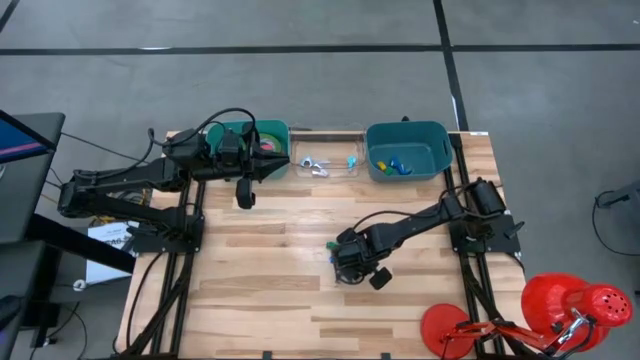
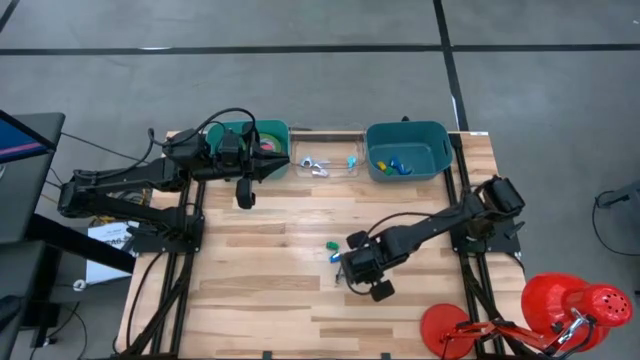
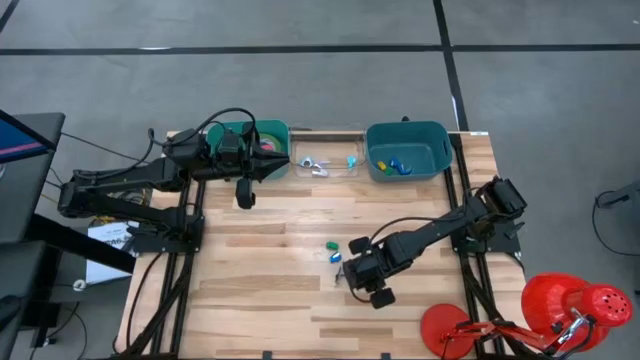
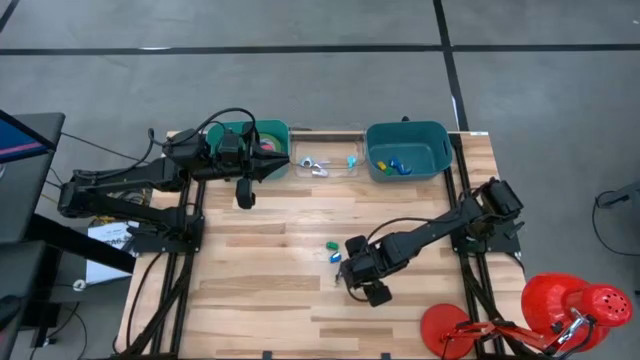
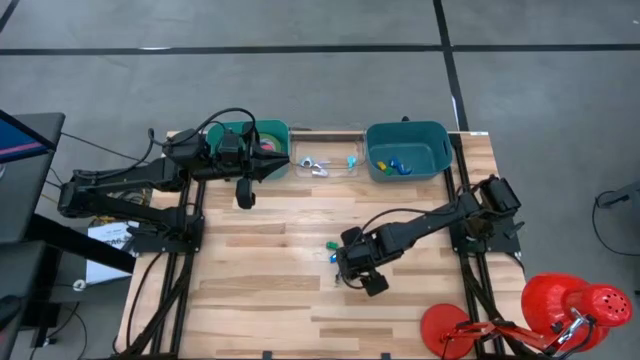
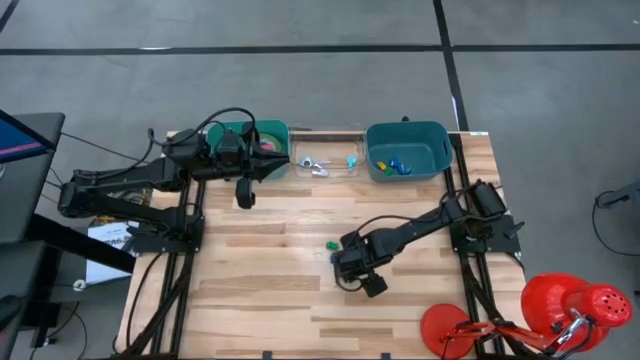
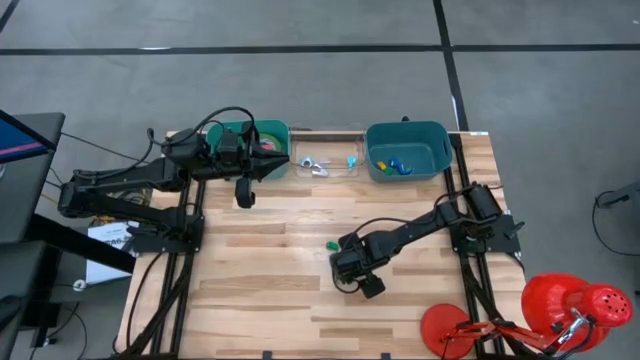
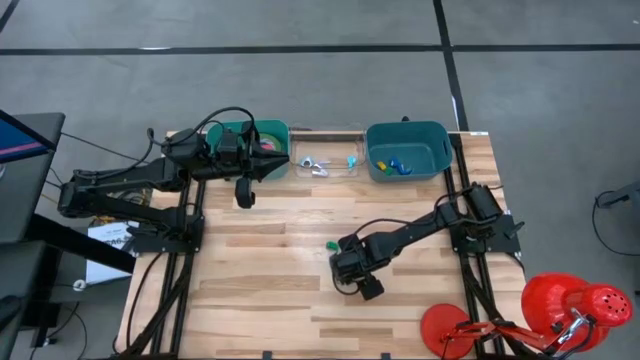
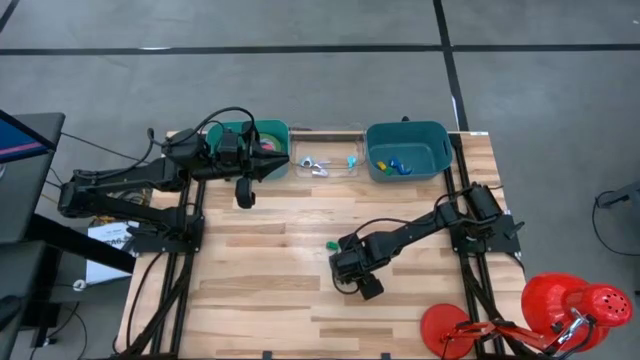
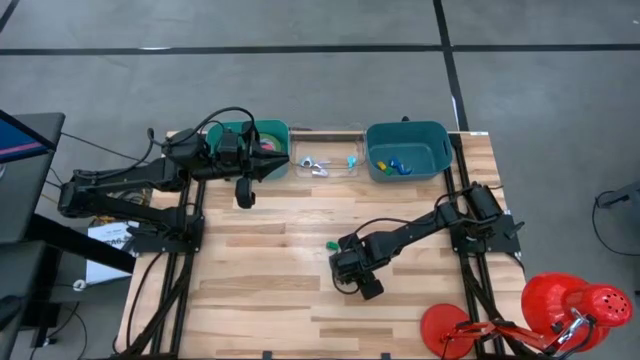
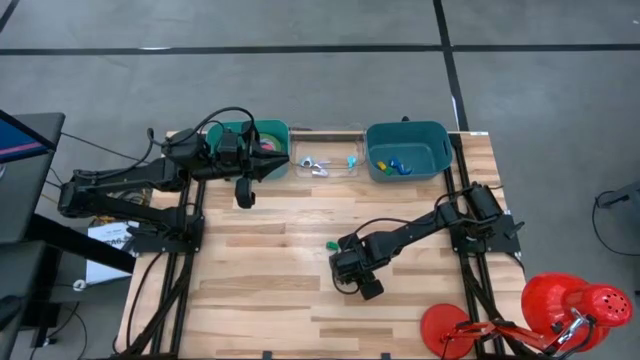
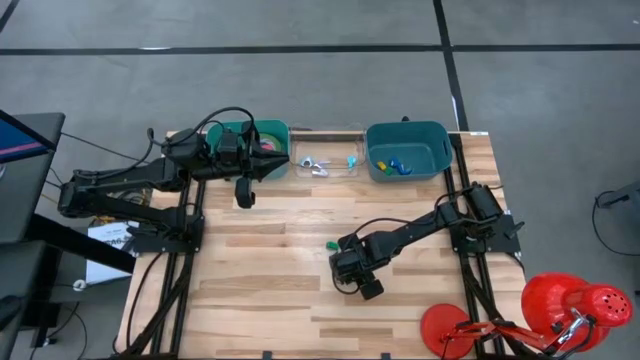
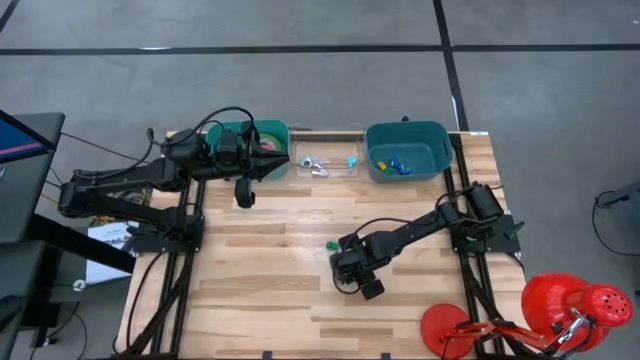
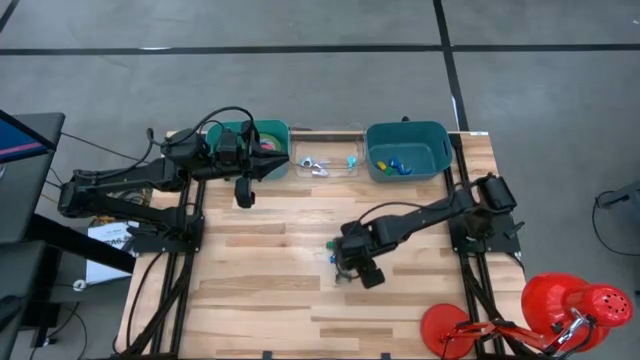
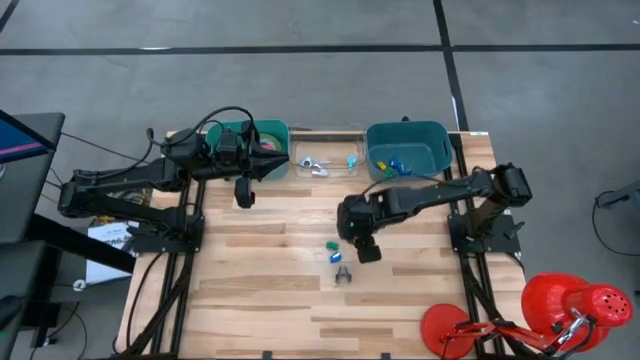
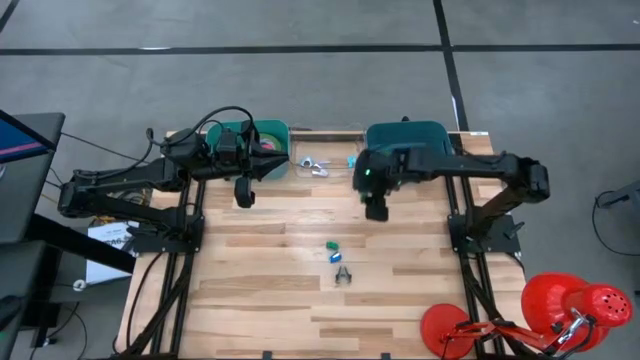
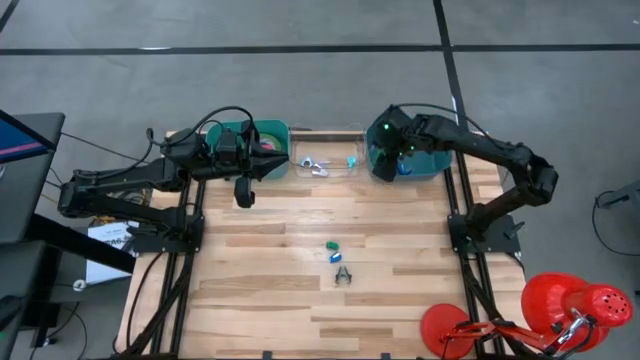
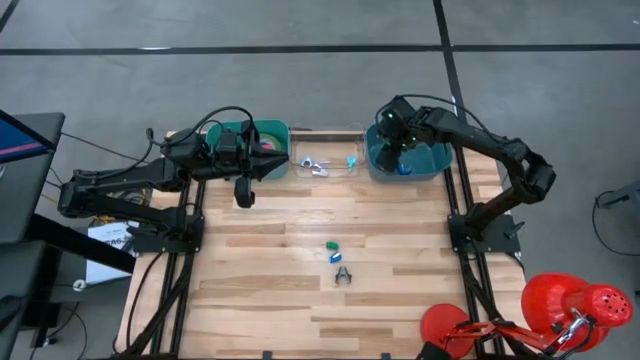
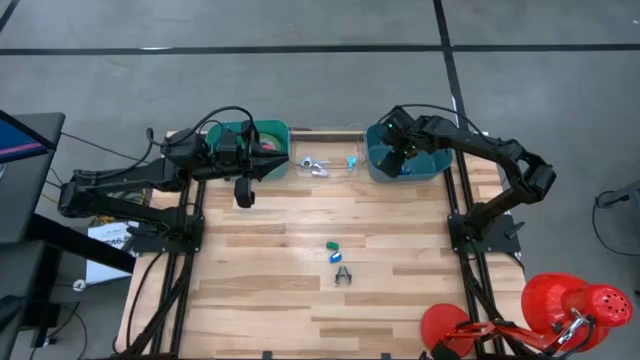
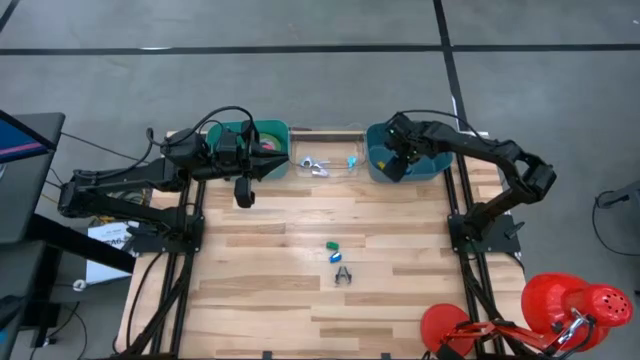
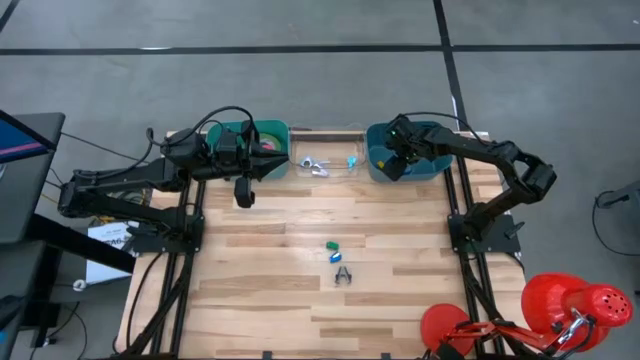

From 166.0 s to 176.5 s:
Task: Pick and place Stapler, Stapler remover, tape
Put the green stapler into the dark blue bin

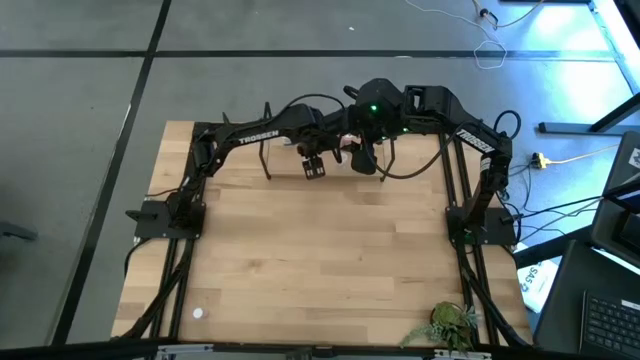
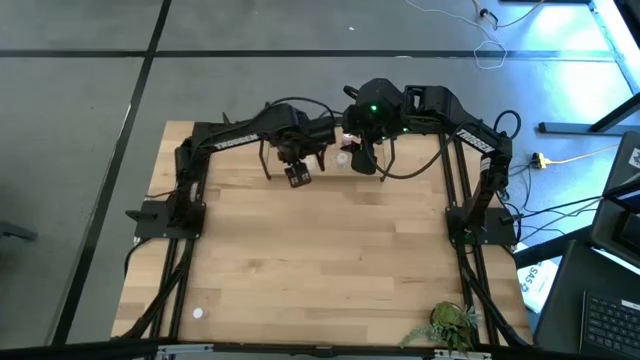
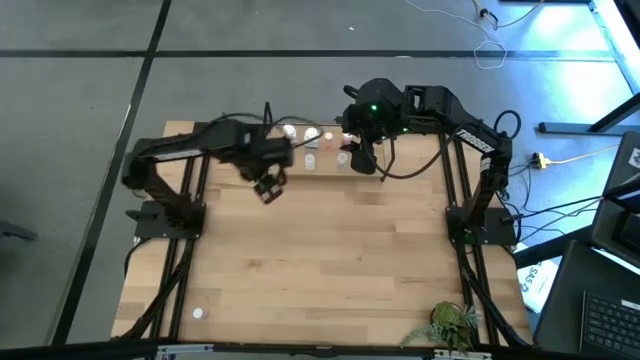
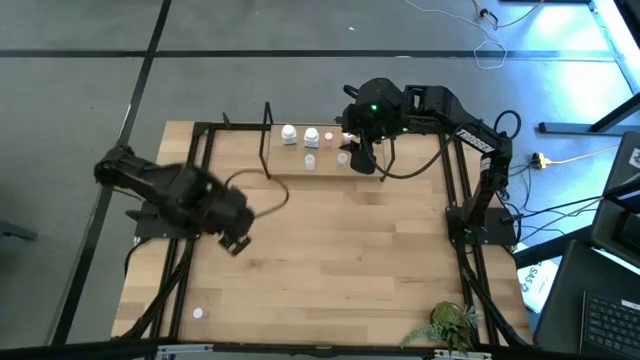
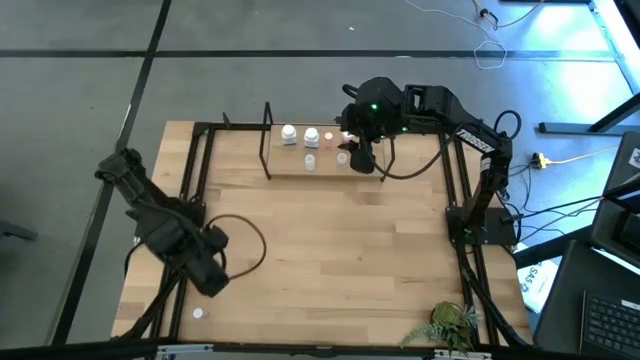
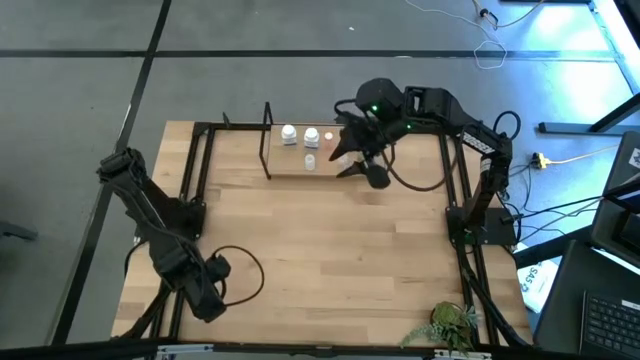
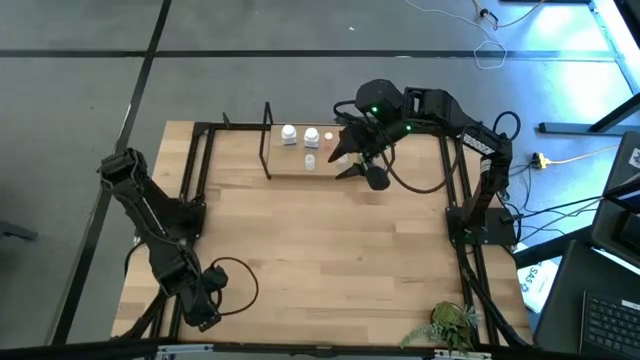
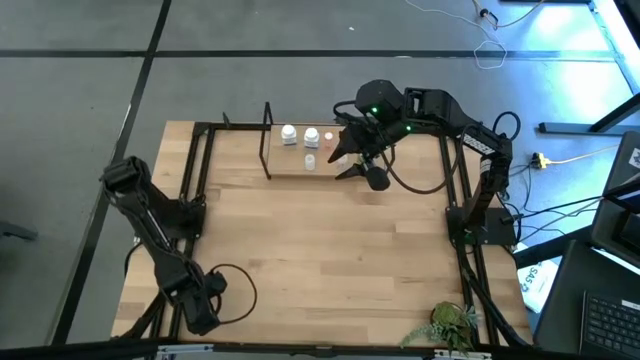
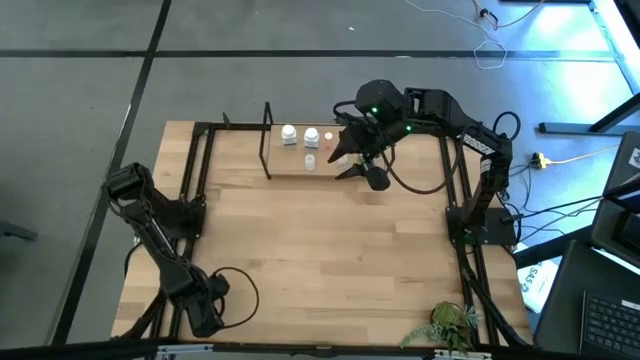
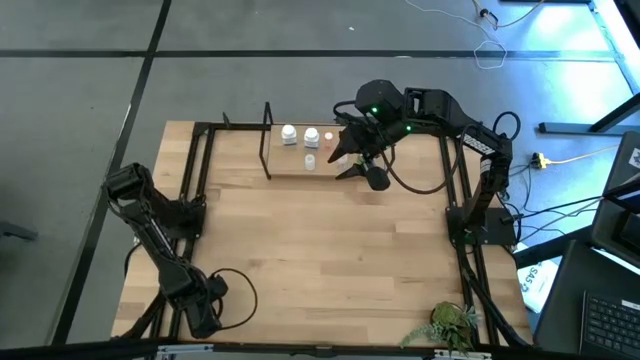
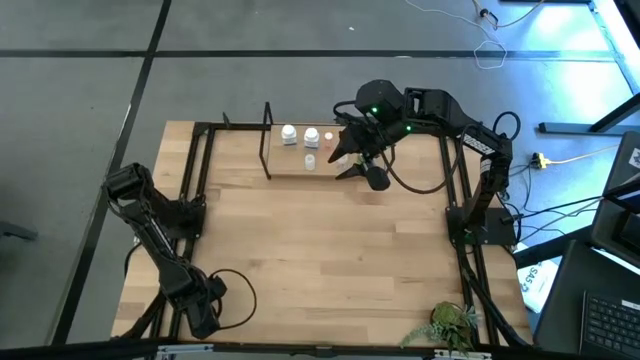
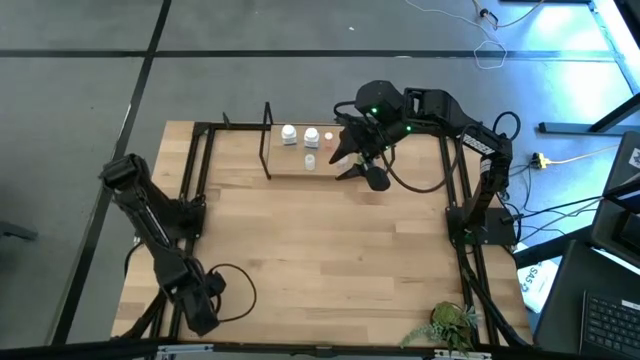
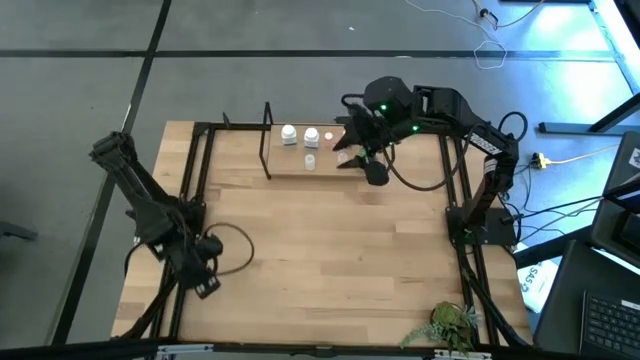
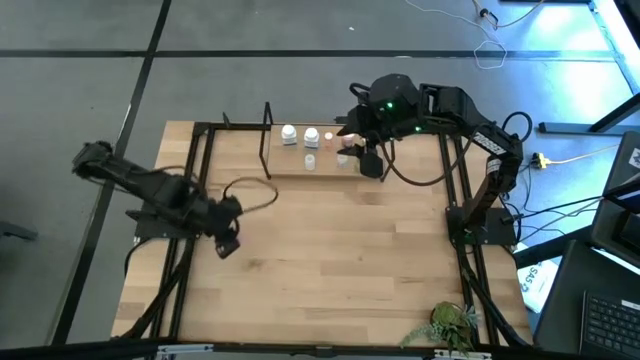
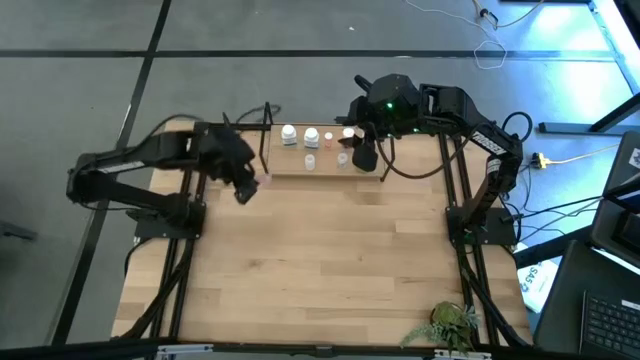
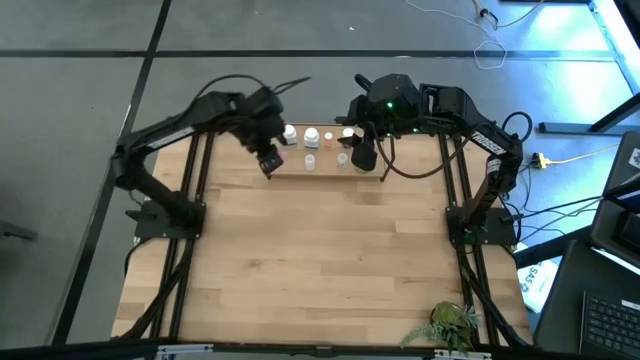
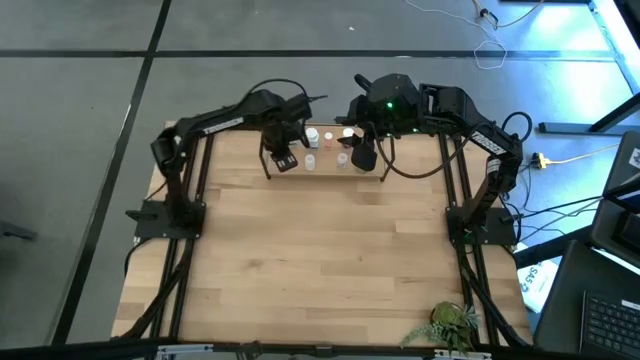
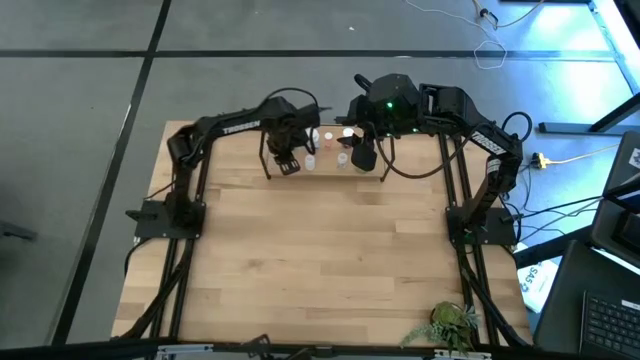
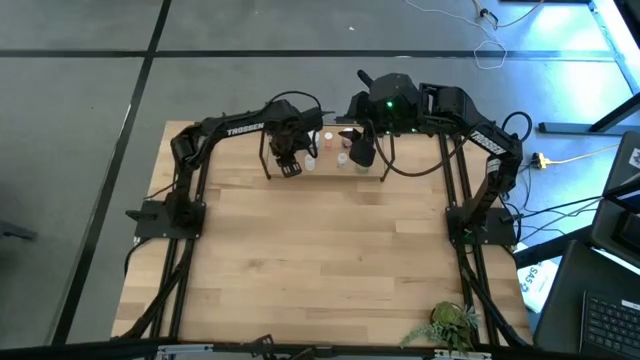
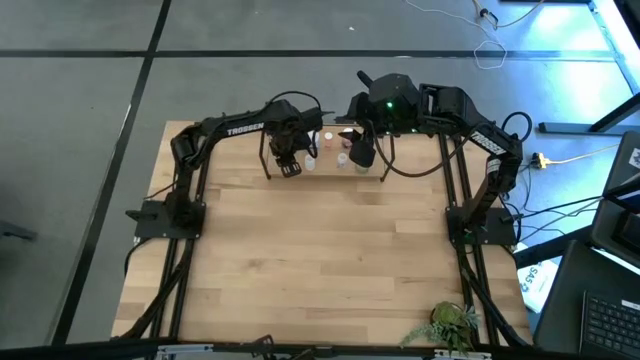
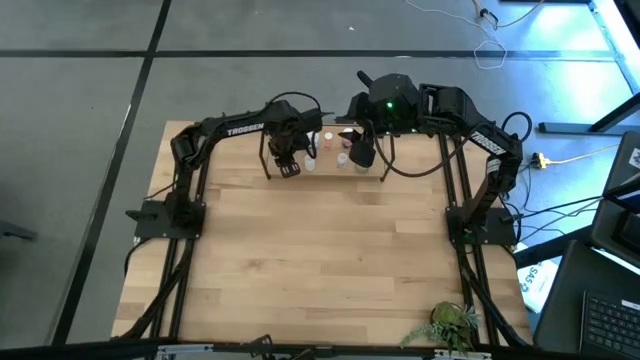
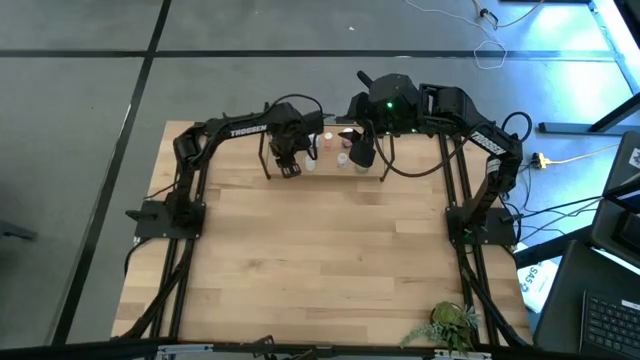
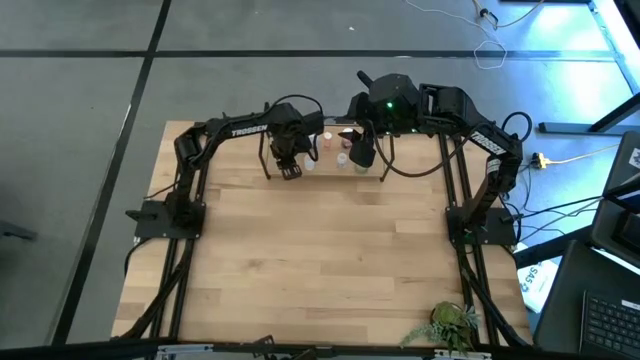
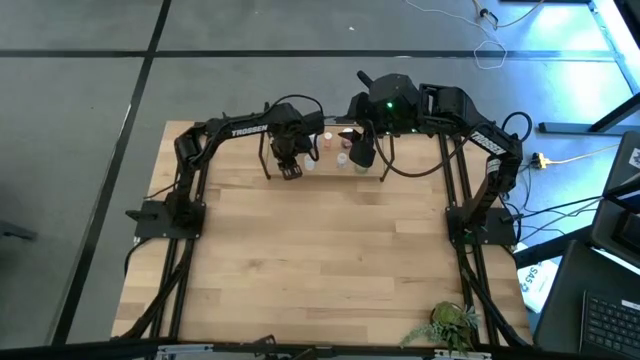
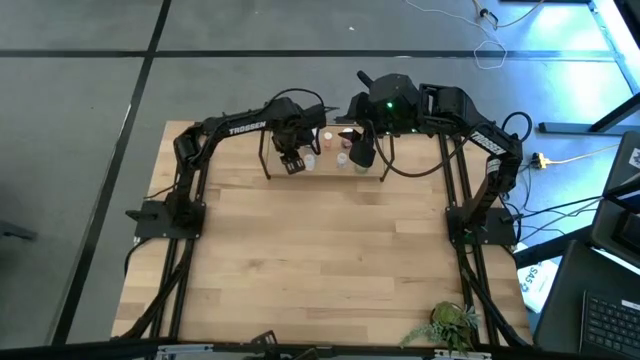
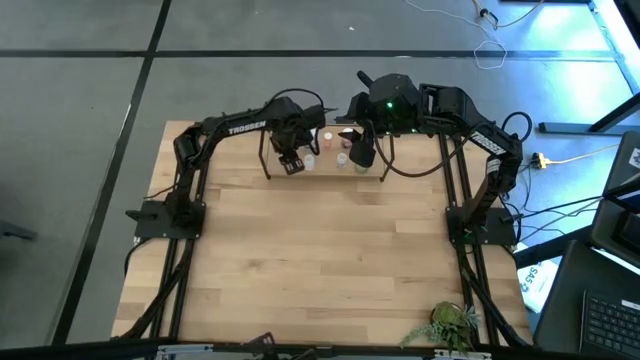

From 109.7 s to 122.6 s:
Task: Pick and place medicine bottles onto shelf by color
Put the pink pill bottle on the shelf
